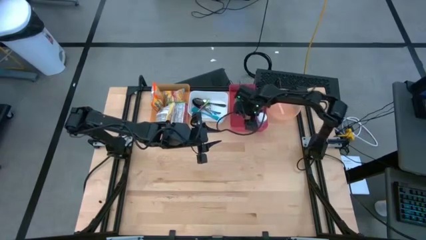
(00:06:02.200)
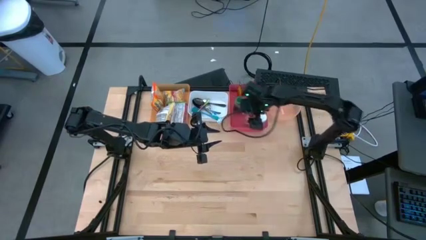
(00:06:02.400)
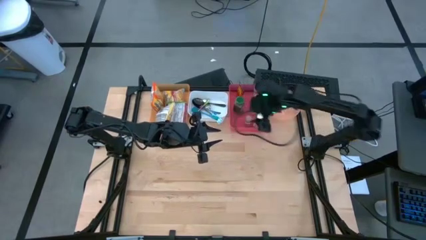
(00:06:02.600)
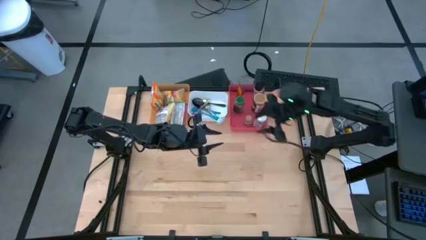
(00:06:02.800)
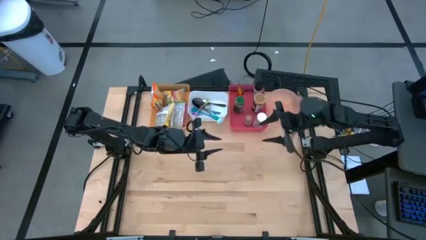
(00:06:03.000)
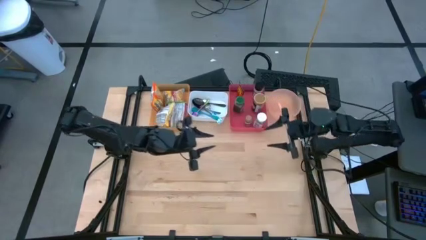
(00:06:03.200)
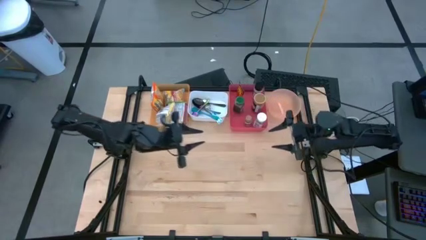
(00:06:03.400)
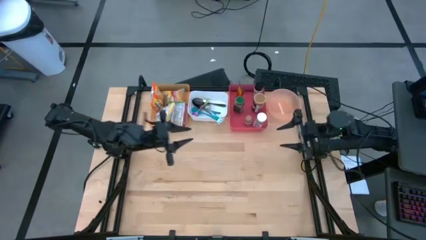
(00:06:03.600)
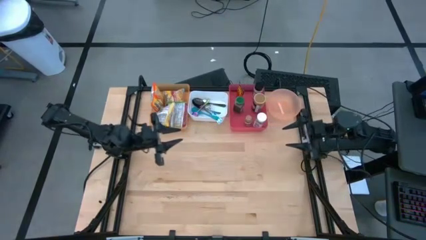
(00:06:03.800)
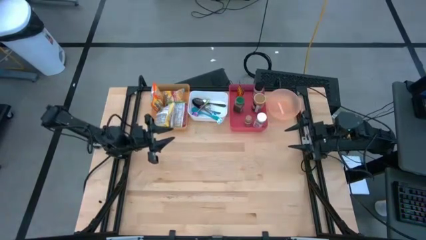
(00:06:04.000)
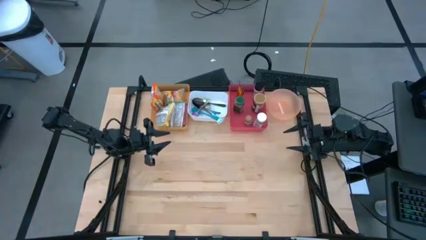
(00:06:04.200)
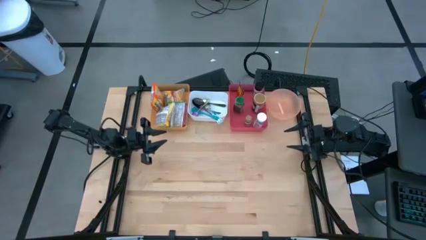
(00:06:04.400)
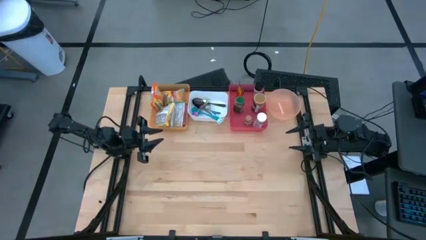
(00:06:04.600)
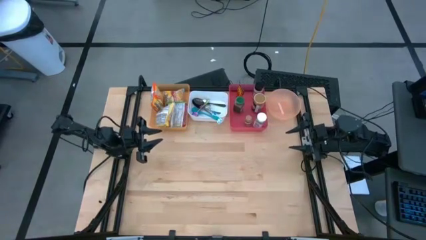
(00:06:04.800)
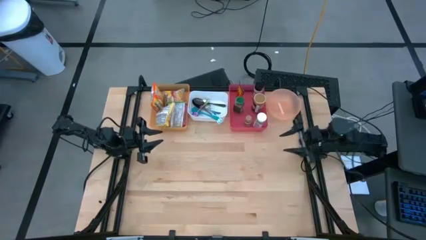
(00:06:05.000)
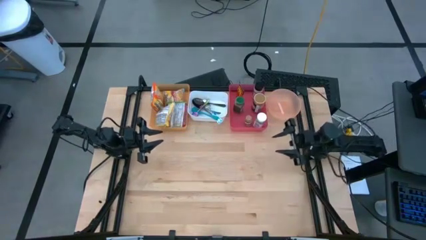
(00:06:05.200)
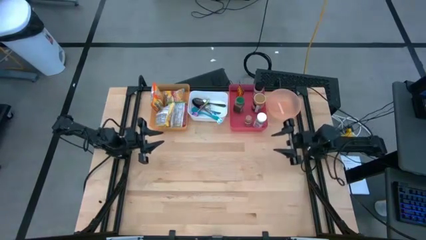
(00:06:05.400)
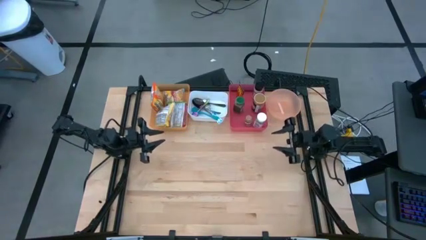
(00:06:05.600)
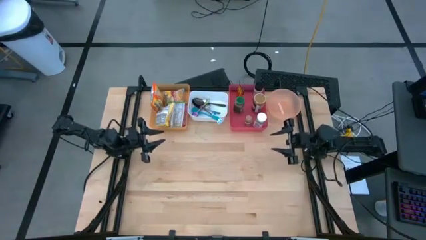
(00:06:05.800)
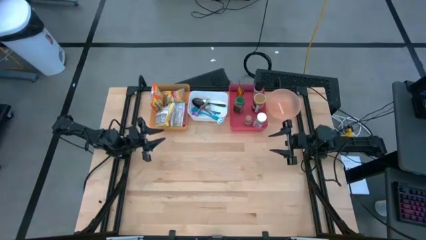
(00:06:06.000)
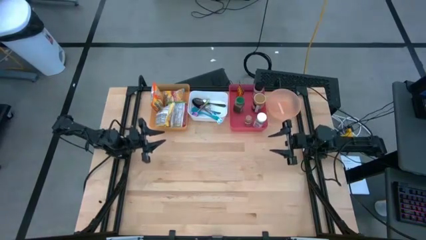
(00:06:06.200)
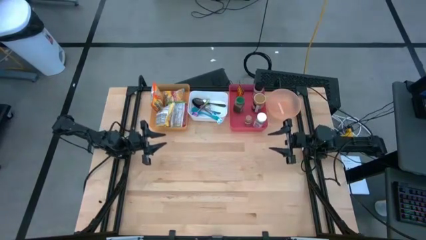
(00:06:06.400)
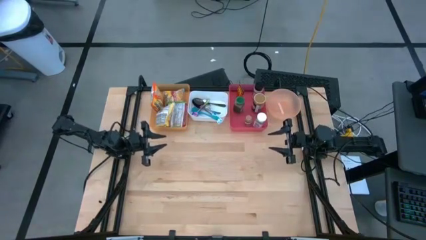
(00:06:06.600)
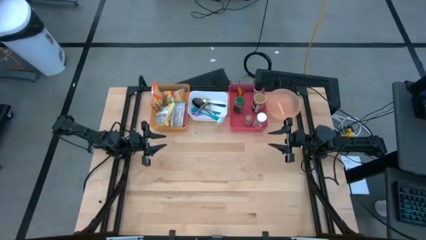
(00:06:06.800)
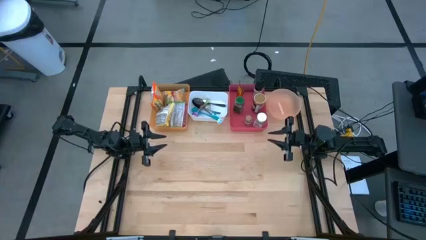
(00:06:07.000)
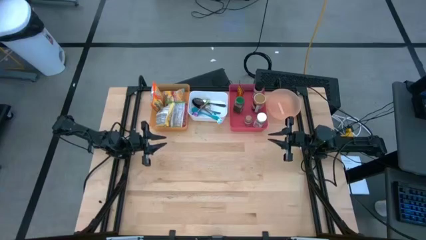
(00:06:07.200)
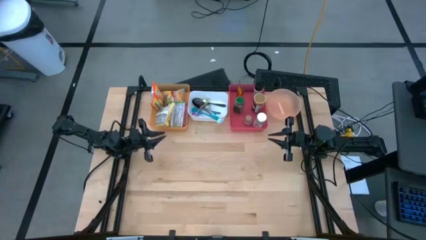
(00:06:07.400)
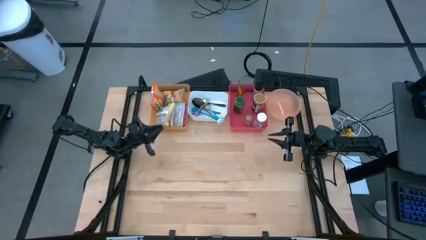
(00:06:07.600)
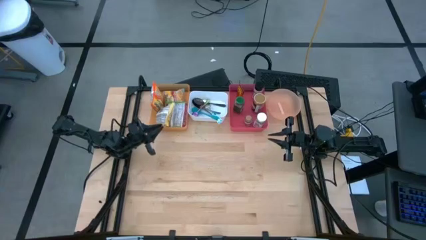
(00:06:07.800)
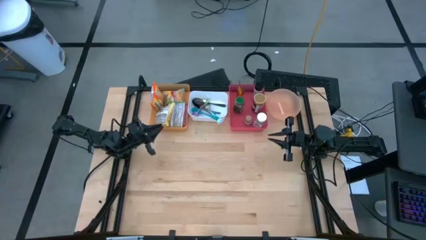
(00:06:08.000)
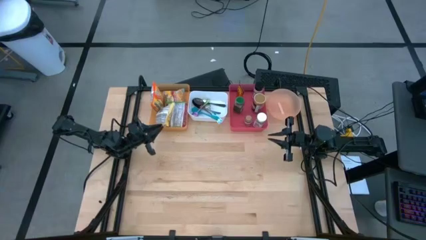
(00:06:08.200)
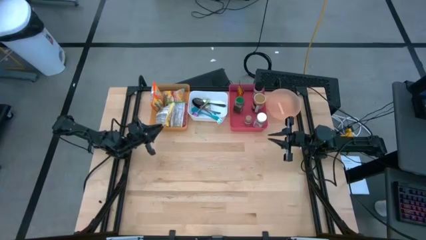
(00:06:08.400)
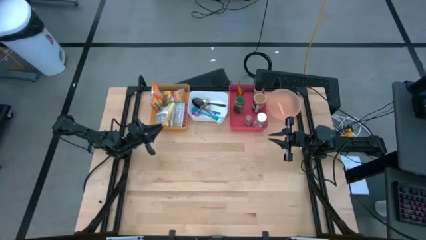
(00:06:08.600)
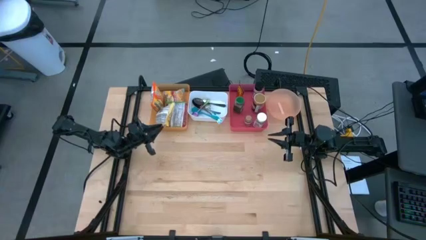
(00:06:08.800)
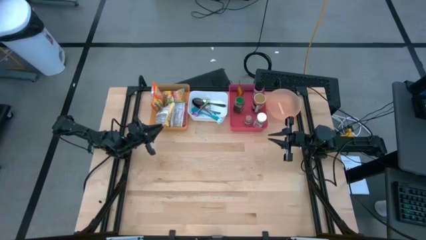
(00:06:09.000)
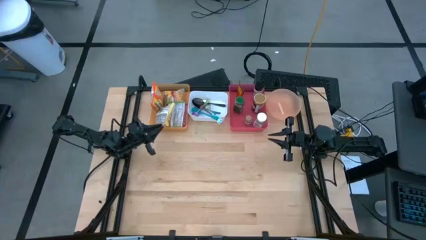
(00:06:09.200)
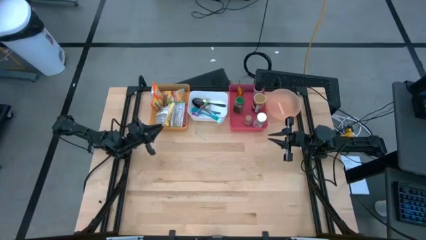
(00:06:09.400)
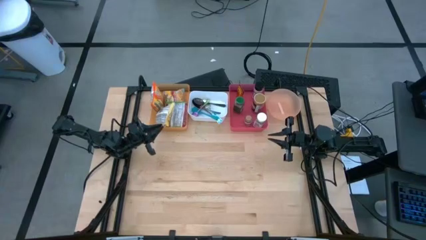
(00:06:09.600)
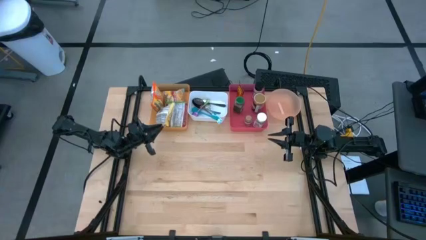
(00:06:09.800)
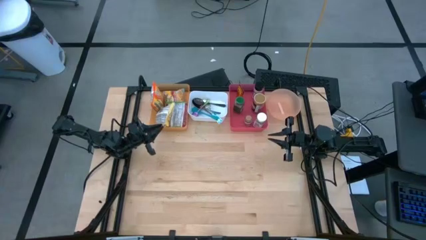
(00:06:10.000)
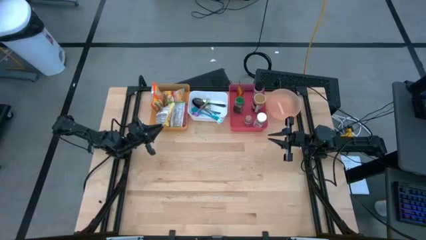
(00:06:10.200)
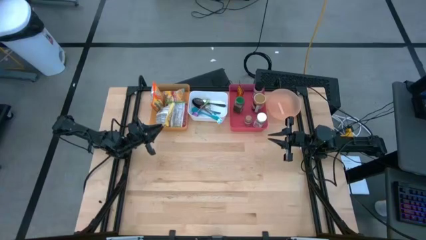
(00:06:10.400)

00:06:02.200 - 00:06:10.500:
Task: Pick & Place Food Item
Return to Home Position

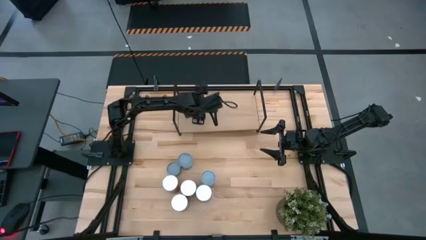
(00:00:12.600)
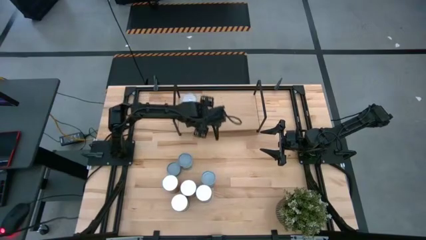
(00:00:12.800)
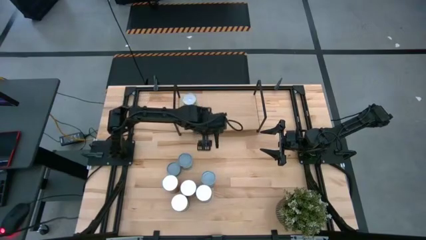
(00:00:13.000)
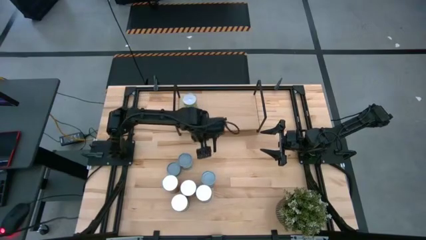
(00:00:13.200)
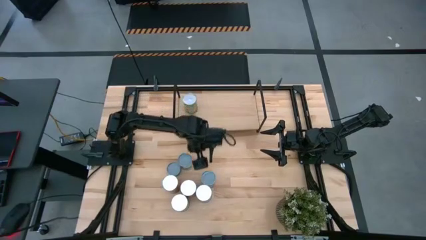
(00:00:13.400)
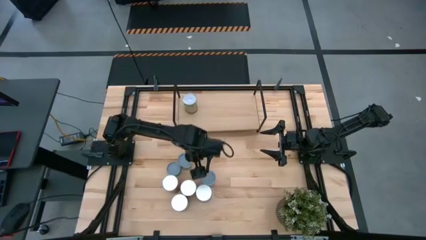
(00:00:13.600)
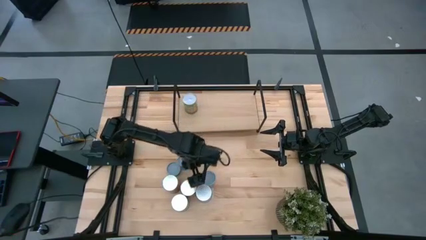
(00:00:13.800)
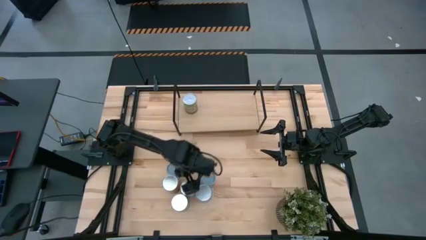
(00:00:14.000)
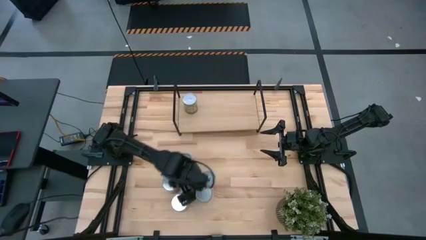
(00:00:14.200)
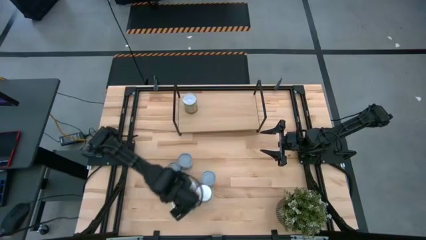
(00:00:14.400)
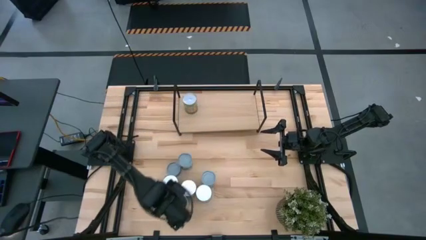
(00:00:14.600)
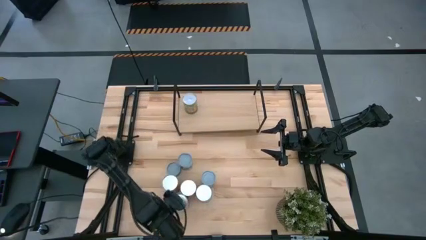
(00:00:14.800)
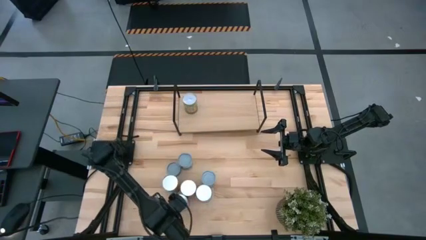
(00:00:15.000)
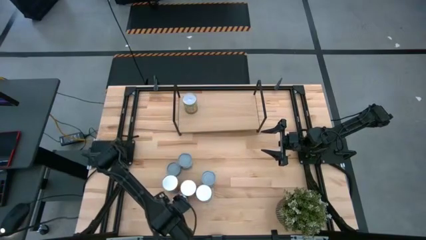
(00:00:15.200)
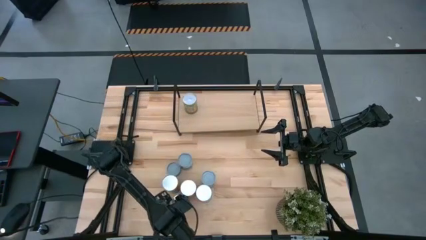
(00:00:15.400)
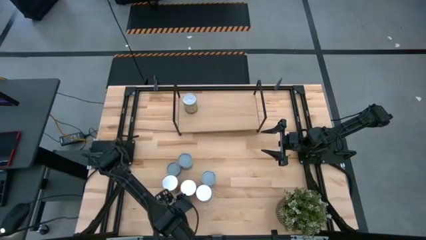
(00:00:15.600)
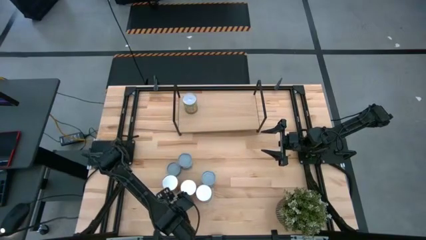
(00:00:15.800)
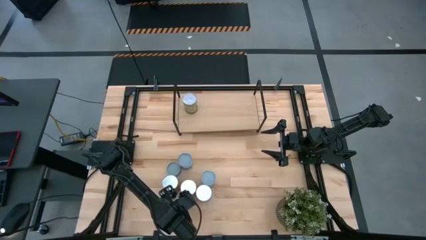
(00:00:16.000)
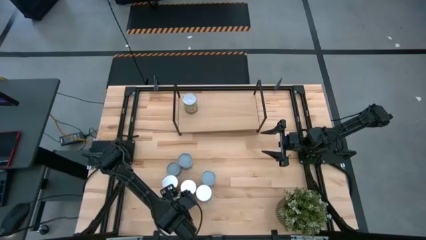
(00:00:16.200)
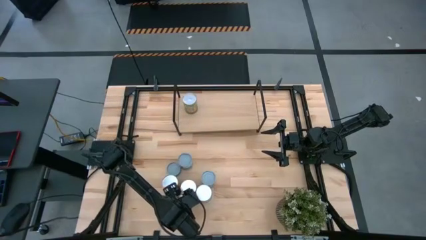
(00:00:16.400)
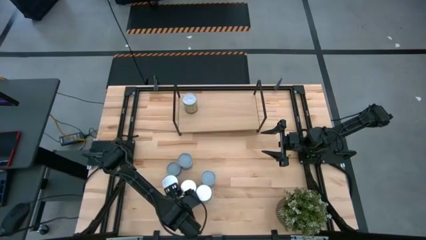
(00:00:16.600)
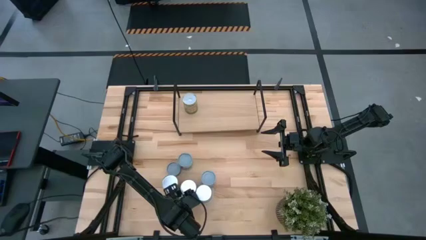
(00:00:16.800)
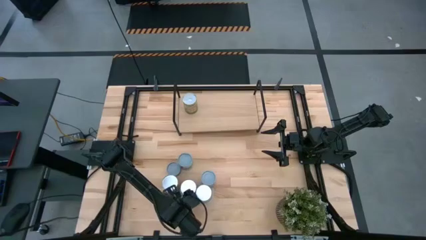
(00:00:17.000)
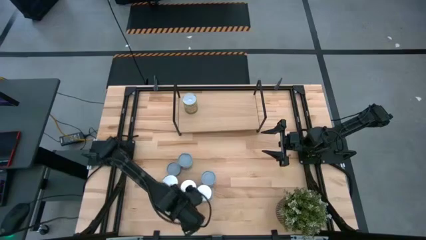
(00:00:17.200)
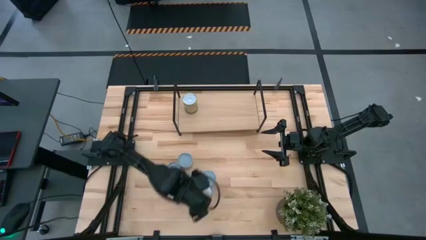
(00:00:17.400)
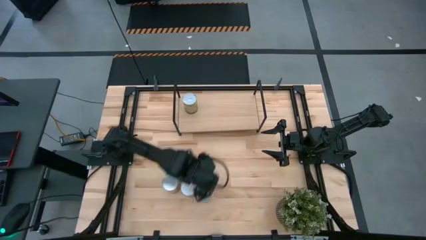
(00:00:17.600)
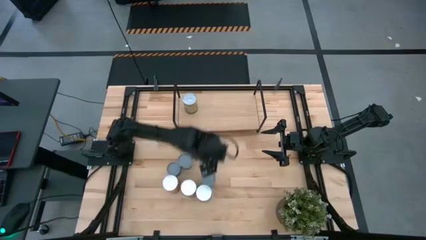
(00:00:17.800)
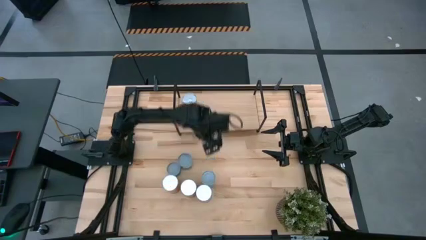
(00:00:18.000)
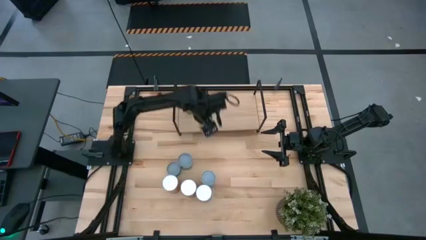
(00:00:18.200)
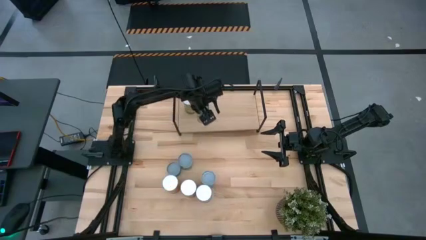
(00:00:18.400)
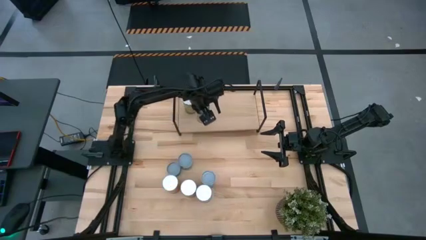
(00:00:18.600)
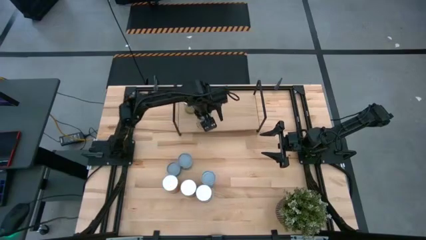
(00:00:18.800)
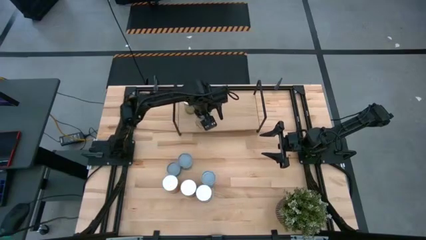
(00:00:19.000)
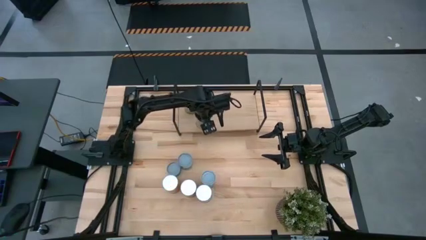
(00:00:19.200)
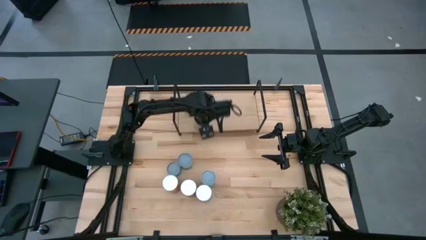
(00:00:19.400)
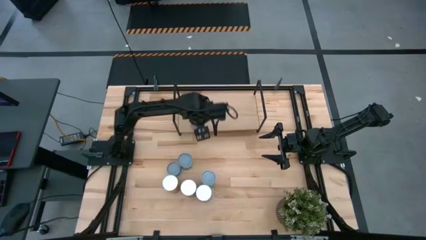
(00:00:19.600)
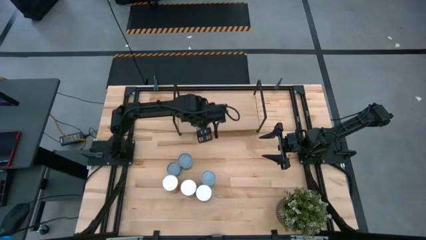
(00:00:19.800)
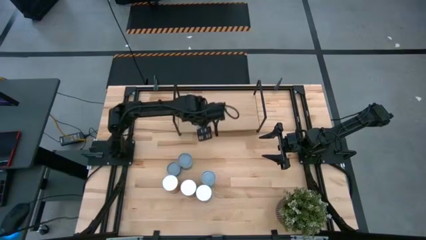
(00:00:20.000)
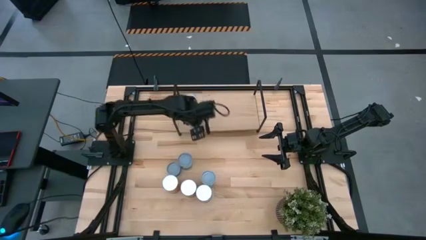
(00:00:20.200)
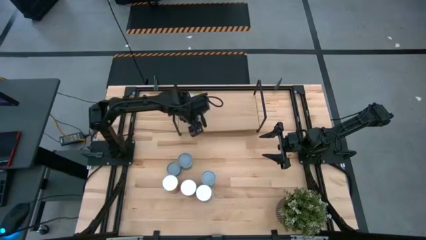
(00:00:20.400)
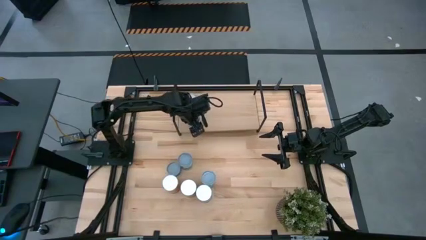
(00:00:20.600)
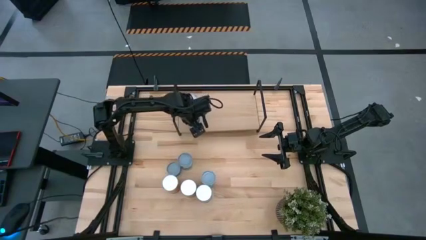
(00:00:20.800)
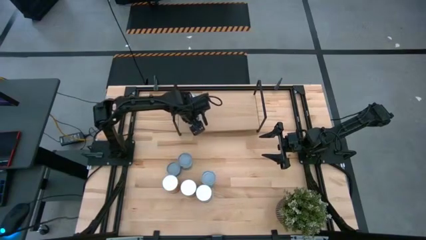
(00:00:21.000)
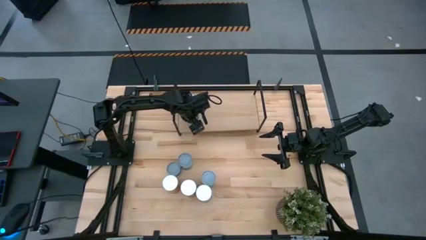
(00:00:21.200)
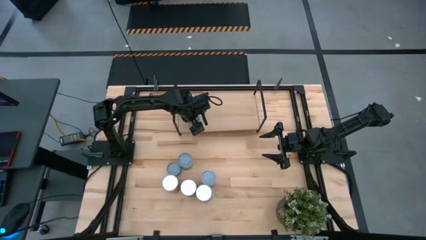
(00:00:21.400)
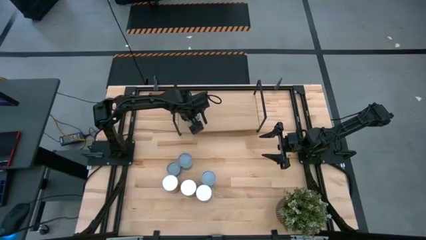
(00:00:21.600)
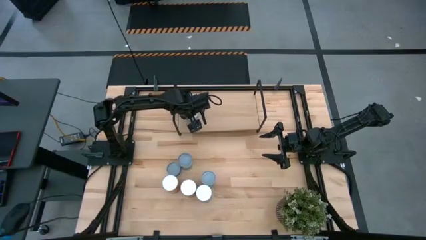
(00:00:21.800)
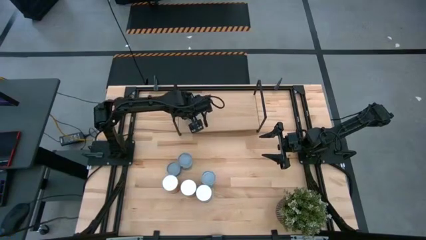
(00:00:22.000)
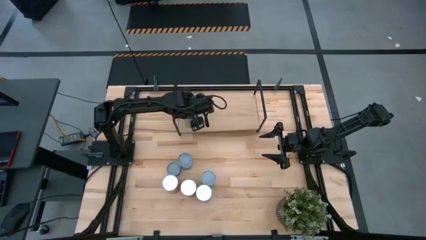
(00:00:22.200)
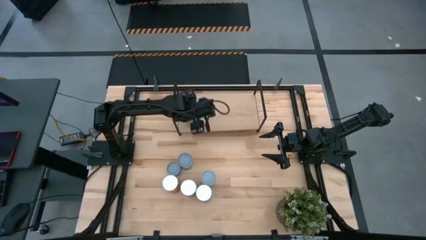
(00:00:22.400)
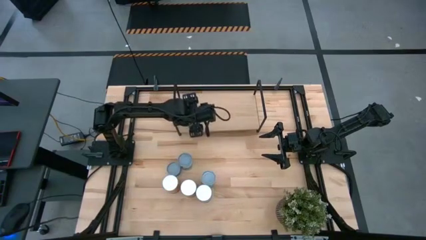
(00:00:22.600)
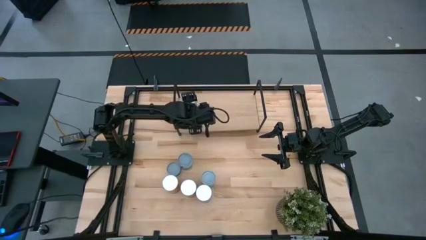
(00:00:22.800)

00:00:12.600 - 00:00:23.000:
Task: Pick and place cans onto a shelf
Put the canned peaches on the shelf
